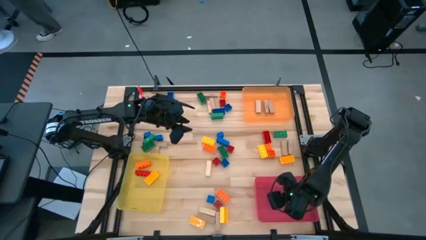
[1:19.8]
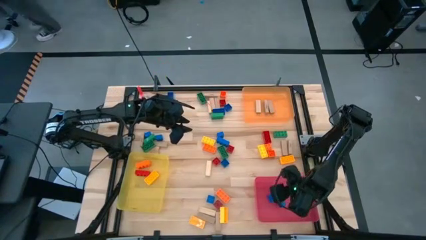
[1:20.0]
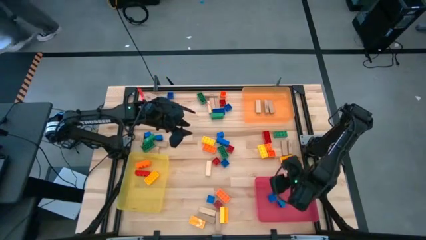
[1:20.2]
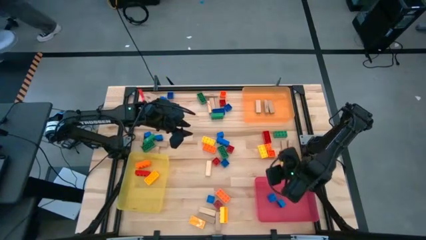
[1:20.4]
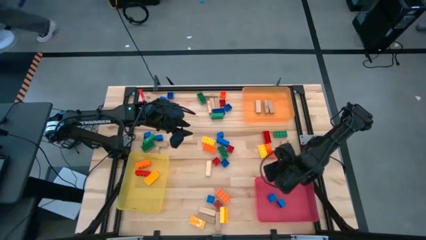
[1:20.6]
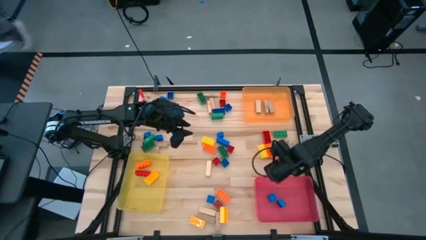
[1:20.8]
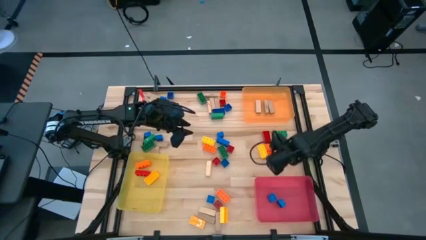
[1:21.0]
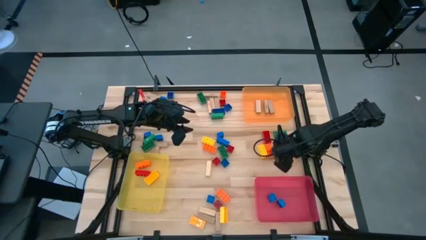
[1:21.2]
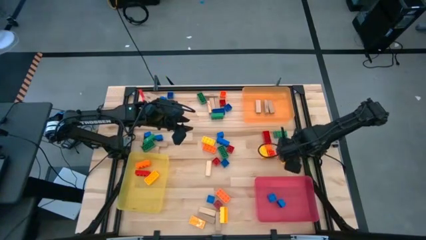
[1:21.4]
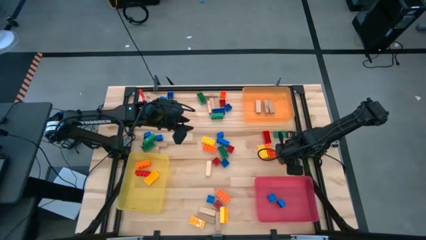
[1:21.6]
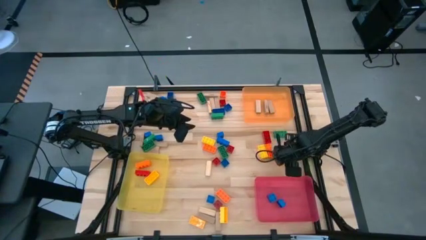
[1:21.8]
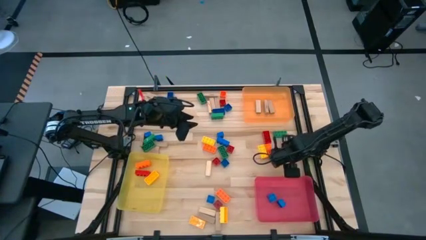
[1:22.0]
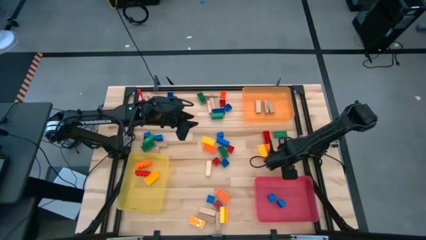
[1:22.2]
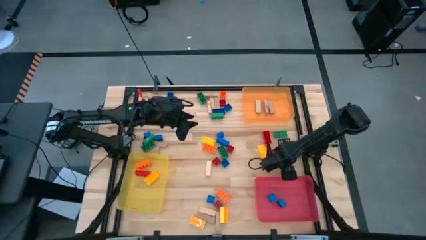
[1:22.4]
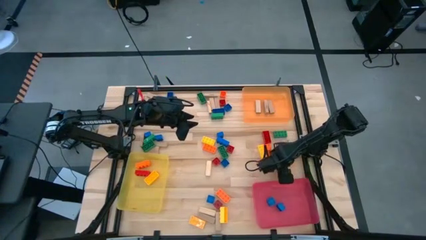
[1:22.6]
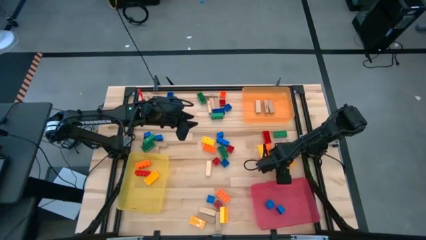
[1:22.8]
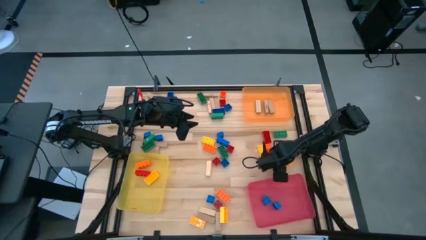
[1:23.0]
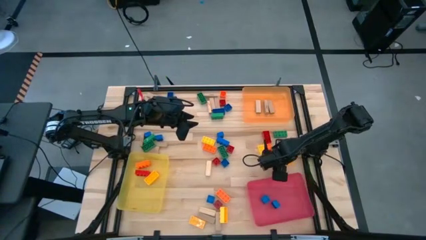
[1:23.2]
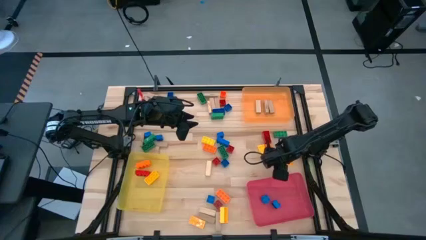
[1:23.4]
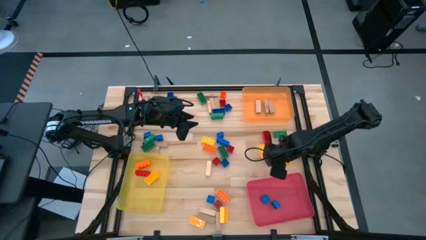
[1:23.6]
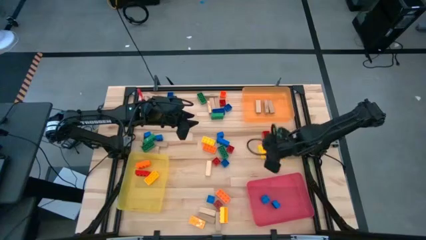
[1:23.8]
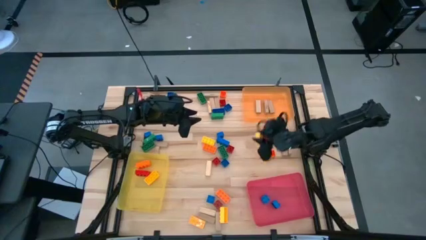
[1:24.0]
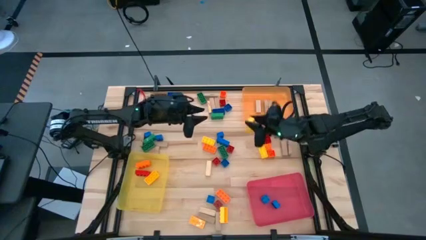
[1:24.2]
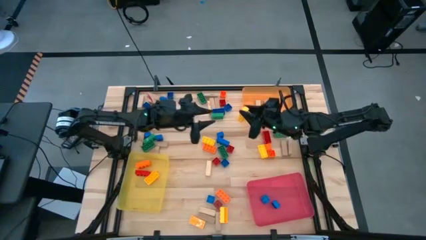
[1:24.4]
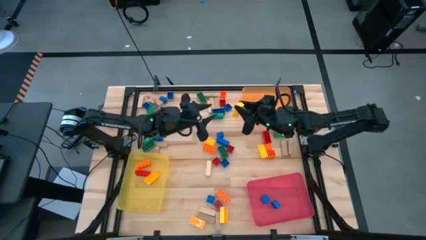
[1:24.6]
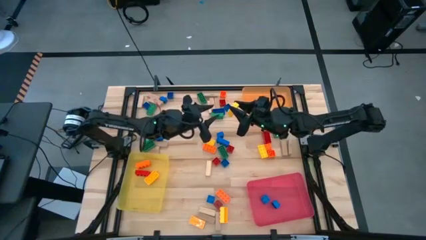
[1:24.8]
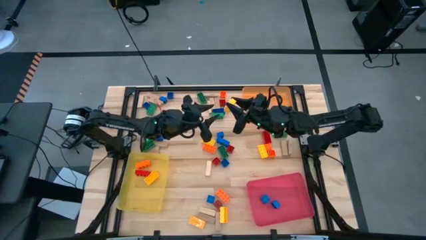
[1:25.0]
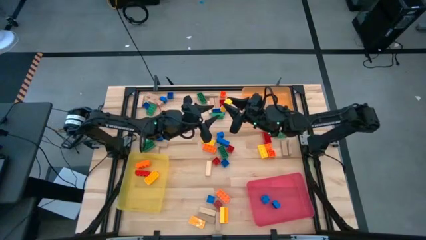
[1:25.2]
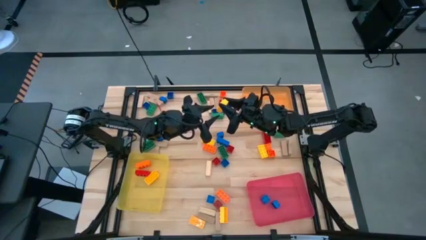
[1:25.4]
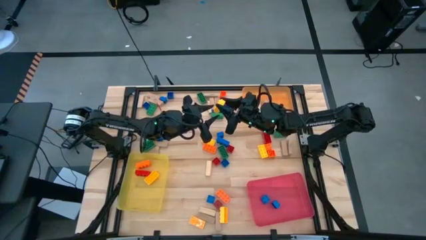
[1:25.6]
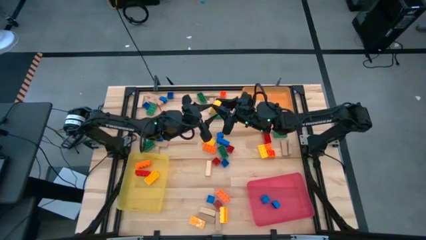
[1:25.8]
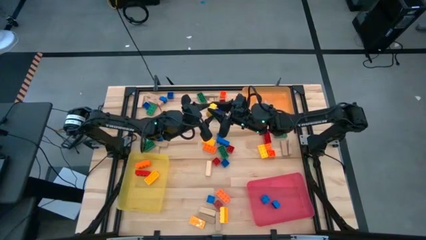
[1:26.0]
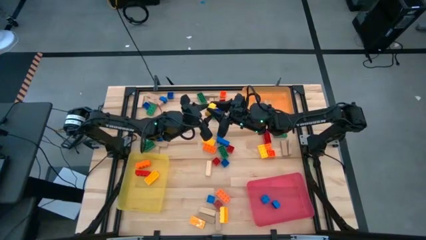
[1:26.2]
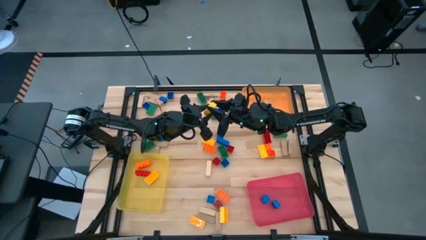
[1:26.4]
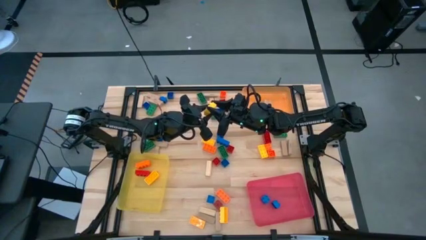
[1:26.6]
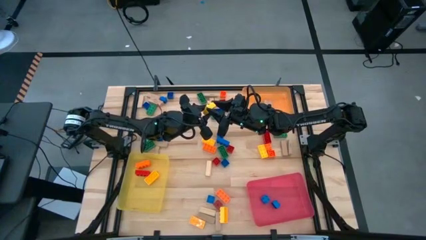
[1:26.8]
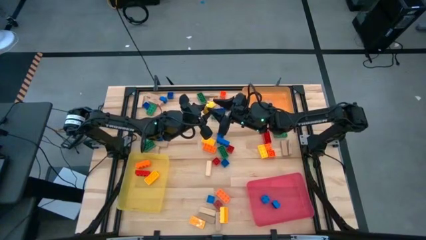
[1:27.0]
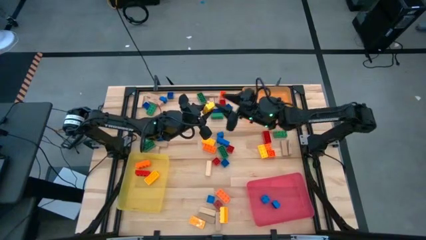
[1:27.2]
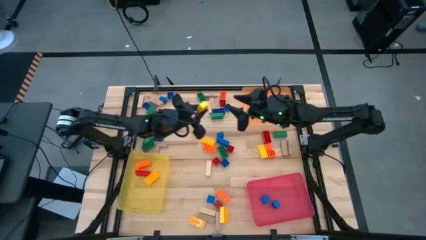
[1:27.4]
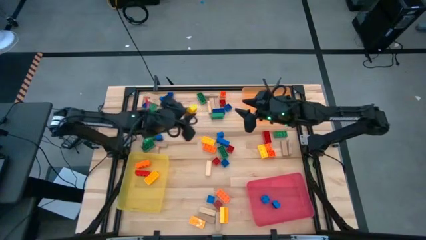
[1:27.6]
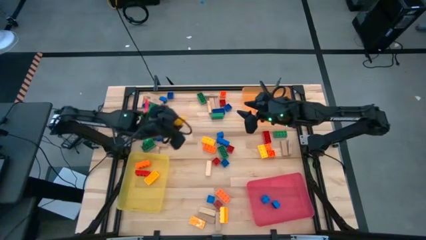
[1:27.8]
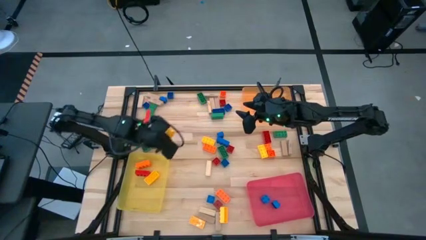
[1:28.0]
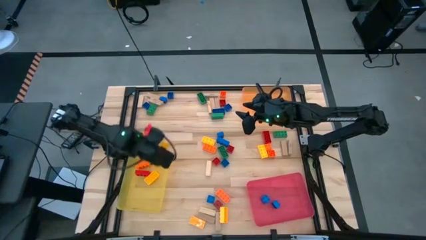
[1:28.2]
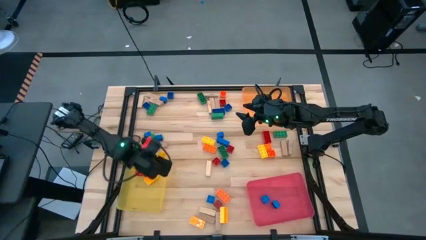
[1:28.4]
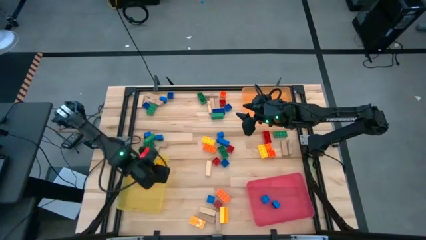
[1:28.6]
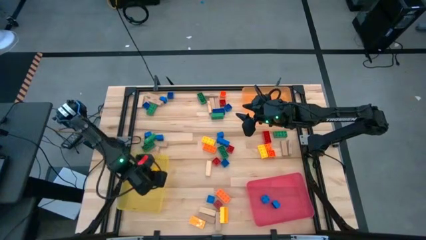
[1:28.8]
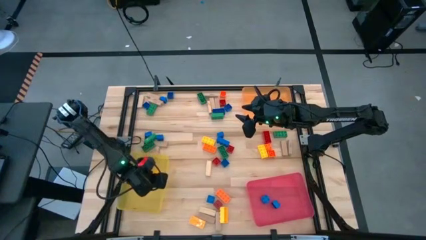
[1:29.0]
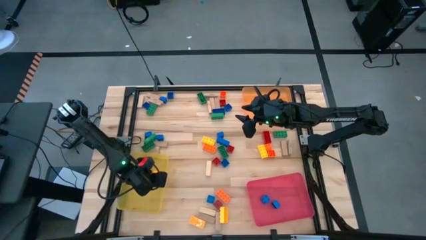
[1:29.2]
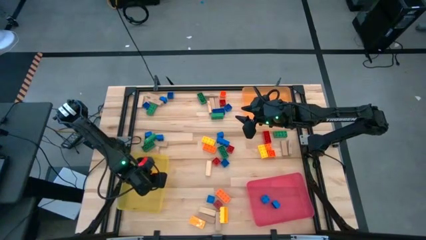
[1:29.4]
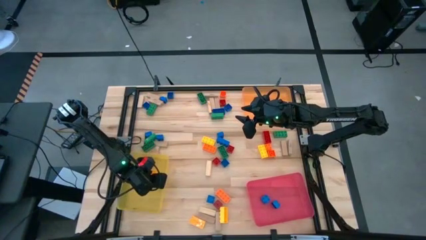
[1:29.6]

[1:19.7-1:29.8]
Task: Sort blocks by size
Put the large yellow game piece into the yellow bin

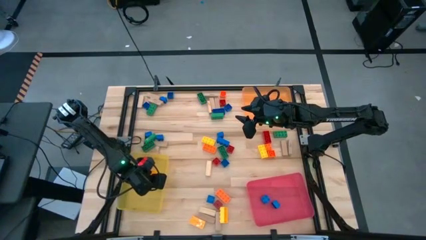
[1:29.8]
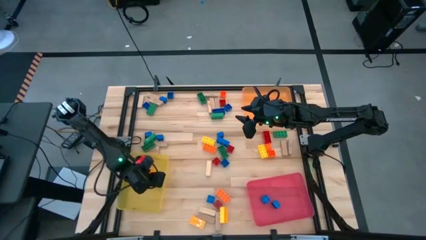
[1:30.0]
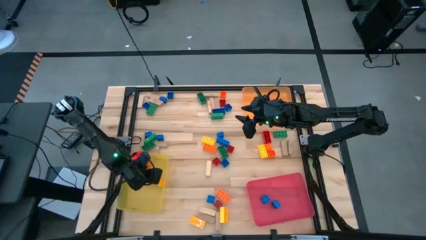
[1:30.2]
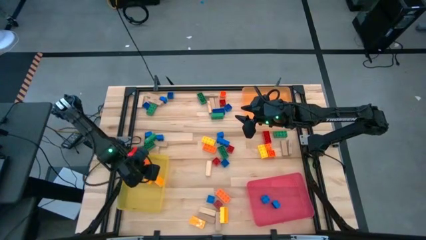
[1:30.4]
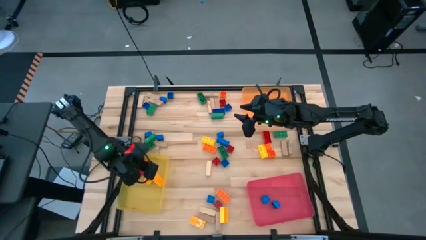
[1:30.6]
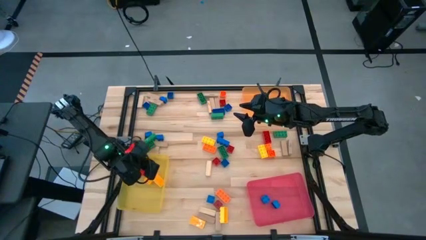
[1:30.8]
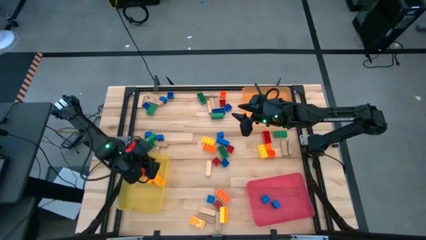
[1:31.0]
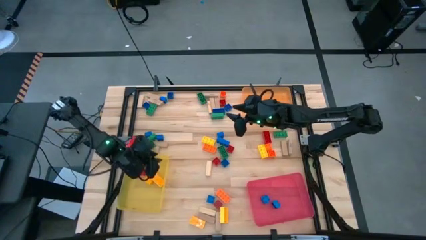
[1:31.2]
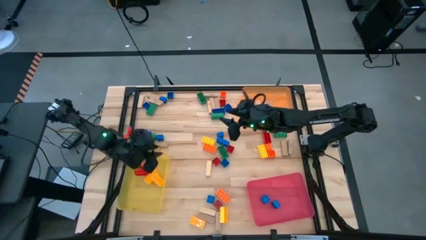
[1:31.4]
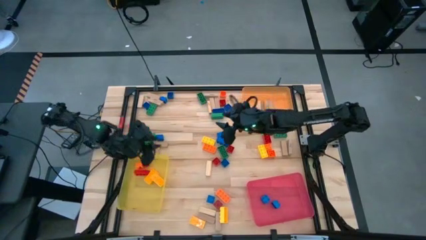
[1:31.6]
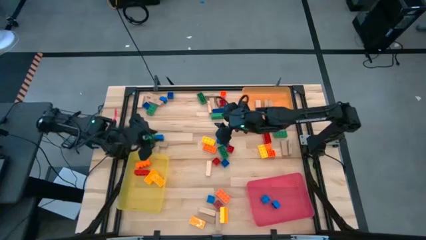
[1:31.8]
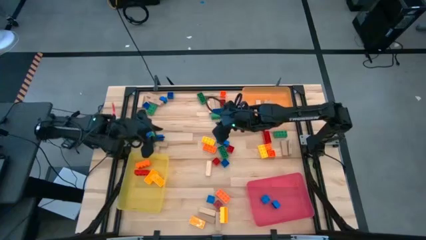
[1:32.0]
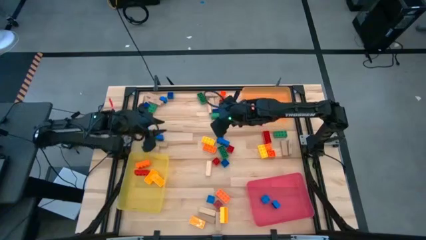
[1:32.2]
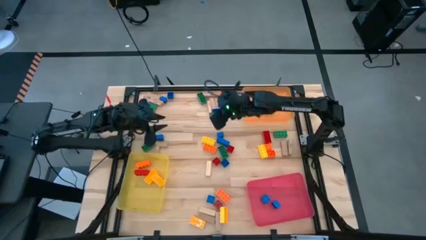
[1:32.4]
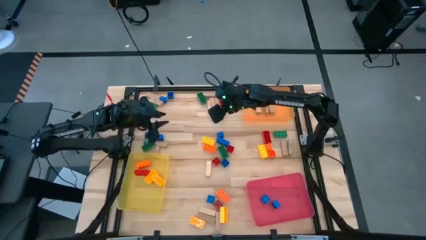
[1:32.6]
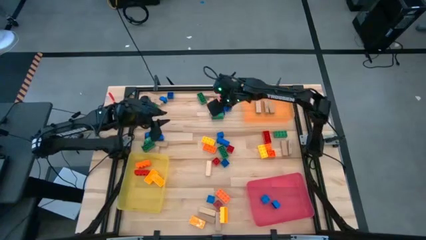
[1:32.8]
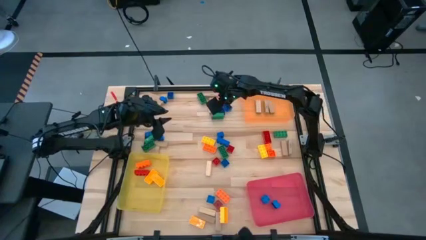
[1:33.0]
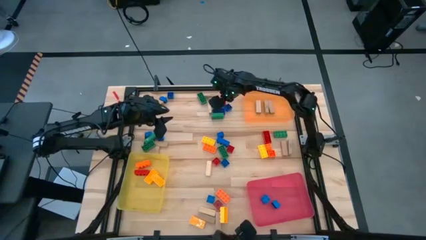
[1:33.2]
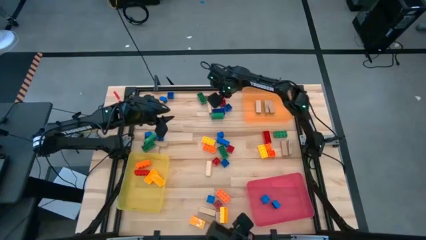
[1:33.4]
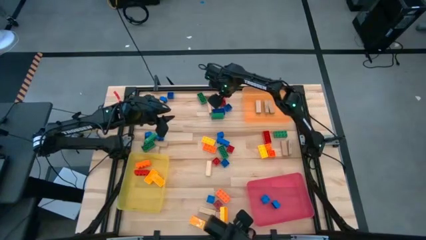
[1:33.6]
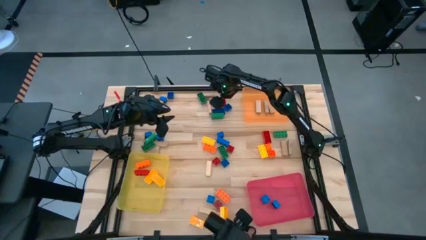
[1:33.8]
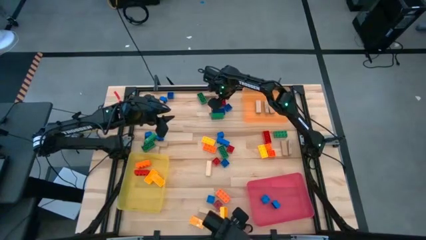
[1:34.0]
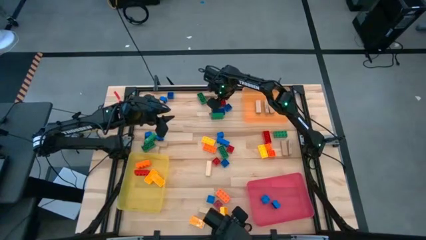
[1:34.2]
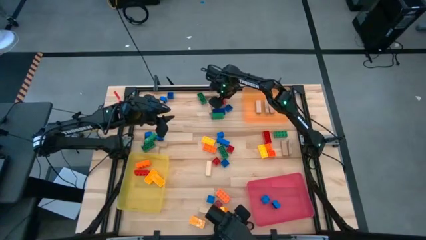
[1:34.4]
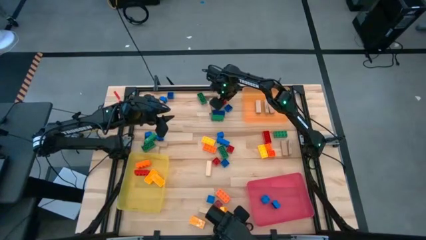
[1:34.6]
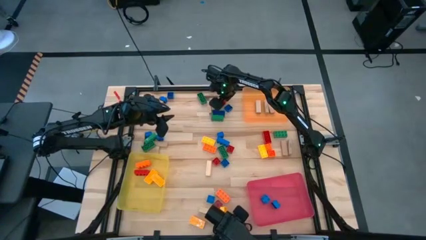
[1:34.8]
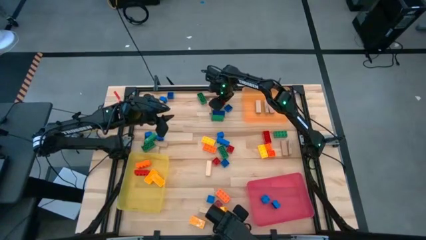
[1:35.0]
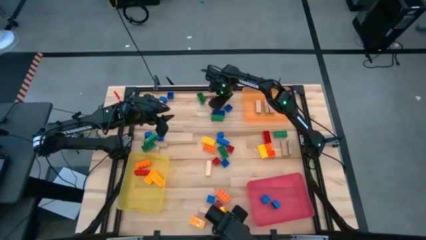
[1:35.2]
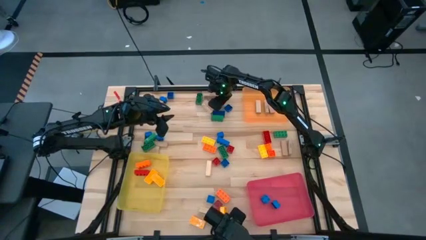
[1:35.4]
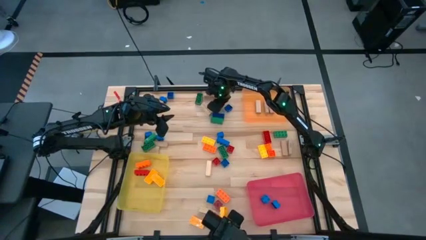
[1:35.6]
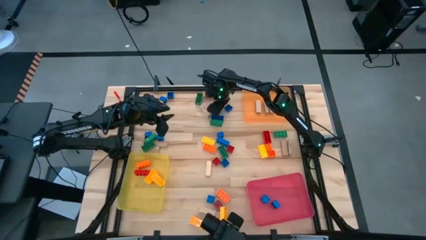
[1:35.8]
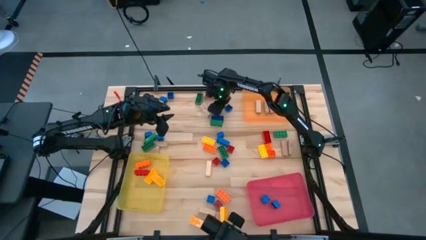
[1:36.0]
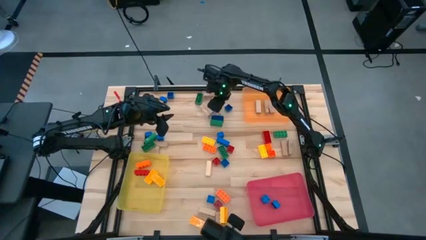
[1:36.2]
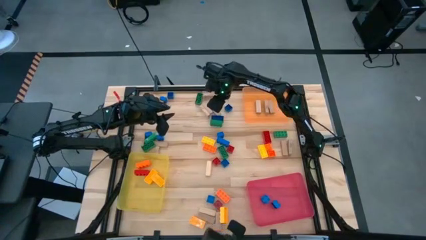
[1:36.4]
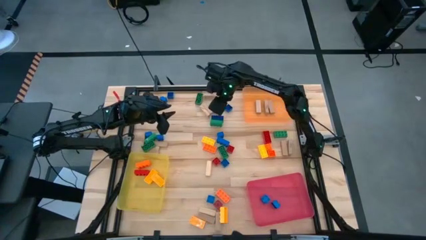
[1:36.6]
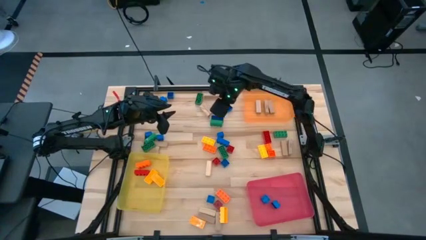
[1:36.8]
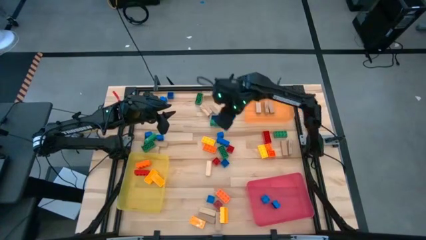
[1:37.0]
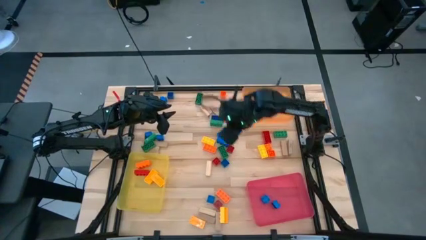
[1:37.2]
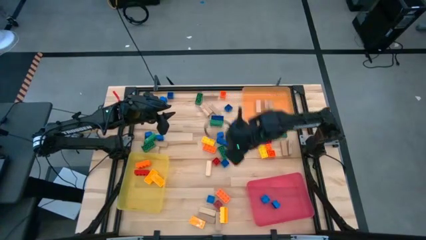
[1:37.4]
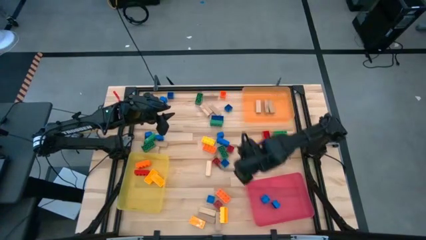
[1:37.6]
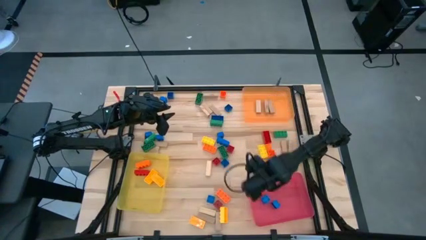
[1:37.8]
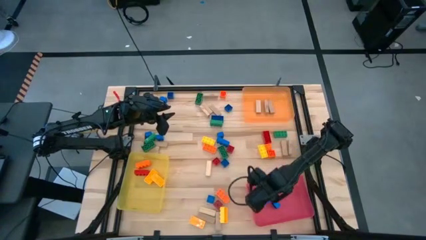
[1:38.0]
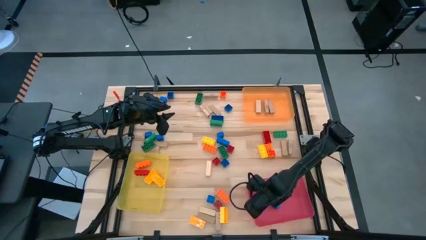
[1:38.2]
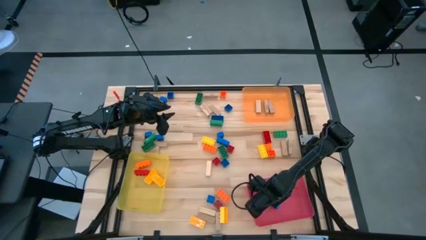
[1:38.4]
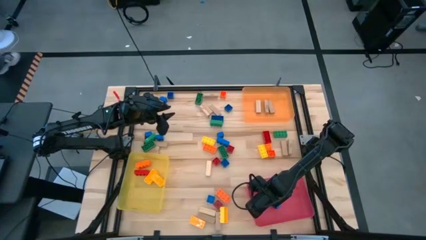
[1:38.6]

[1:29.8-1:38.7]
Put the small red game piece into the red bin
